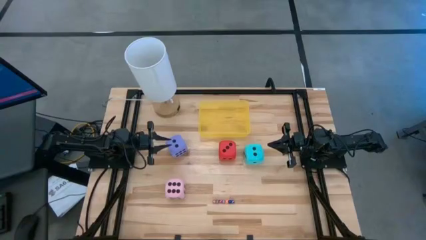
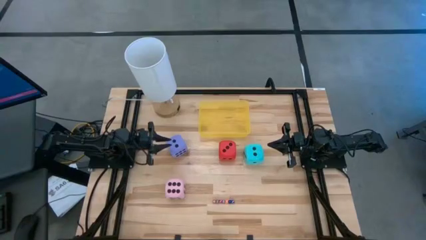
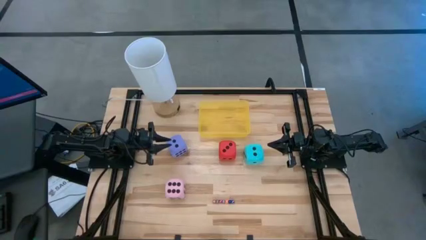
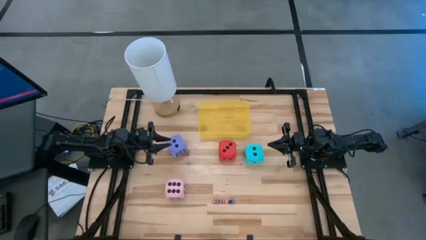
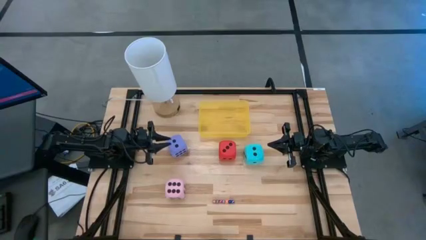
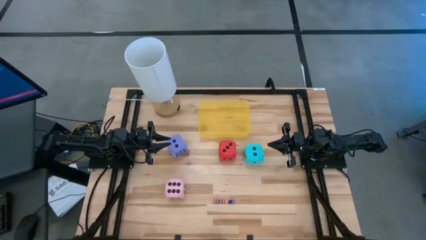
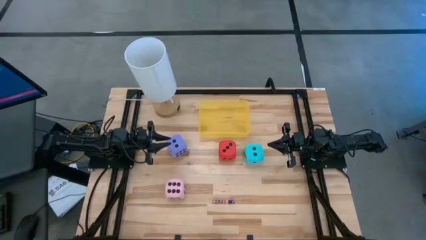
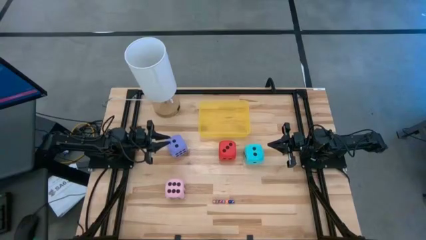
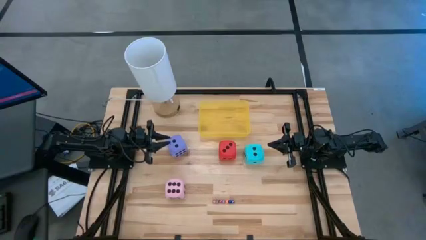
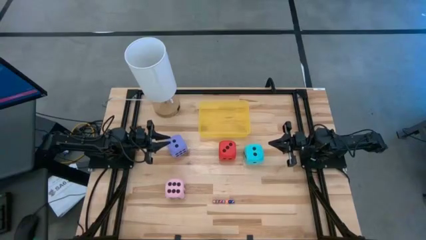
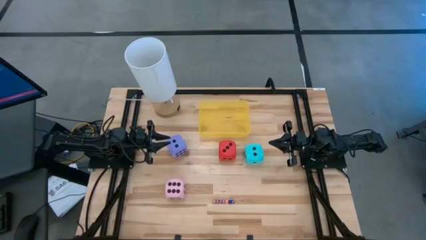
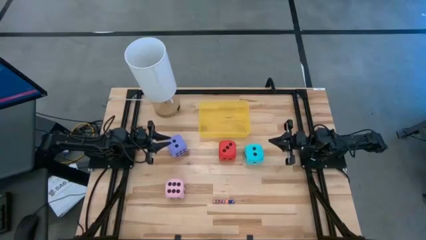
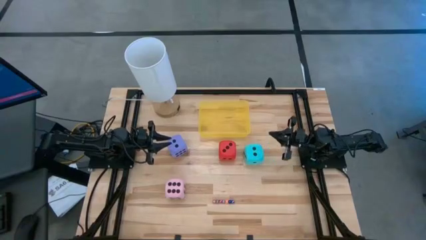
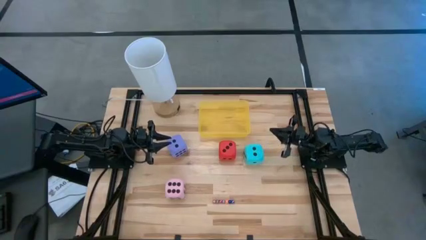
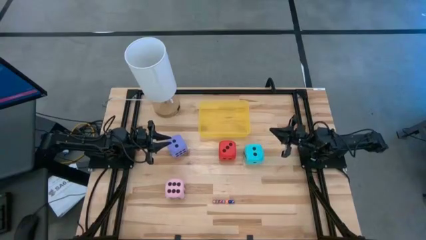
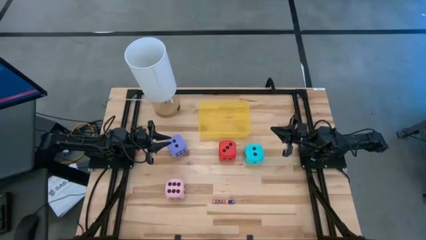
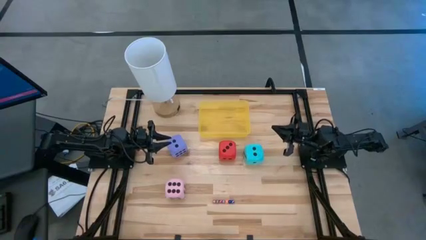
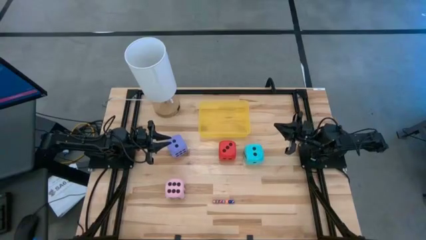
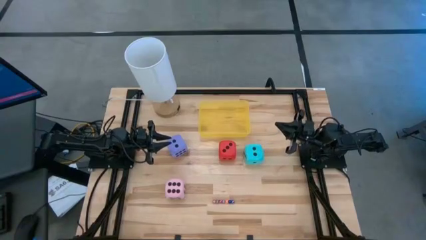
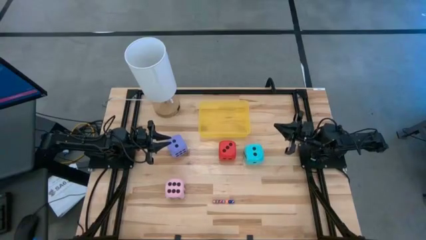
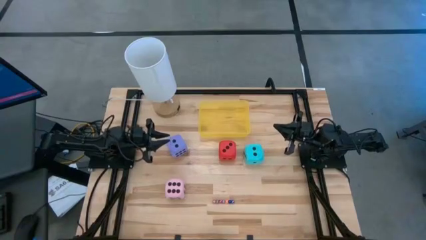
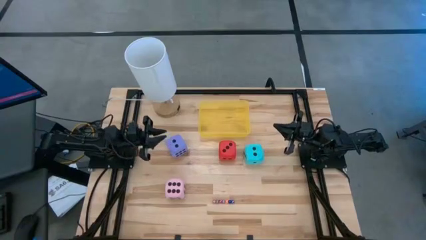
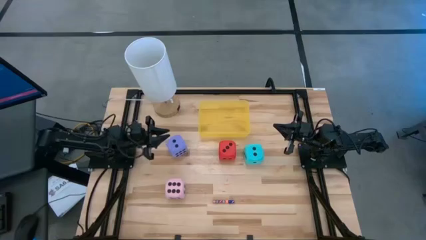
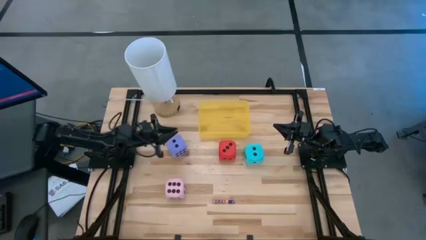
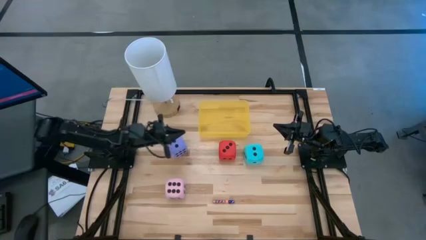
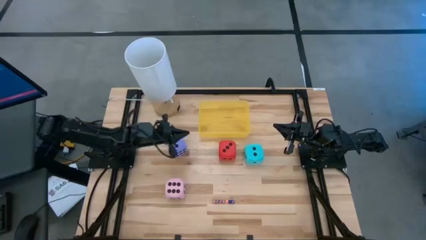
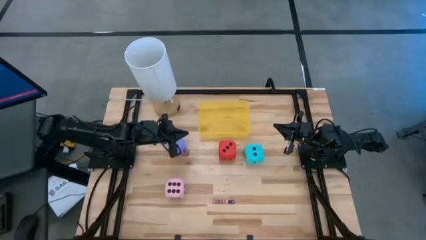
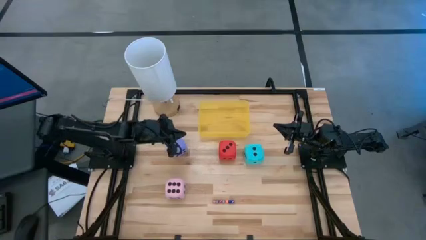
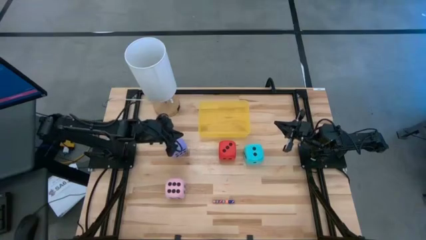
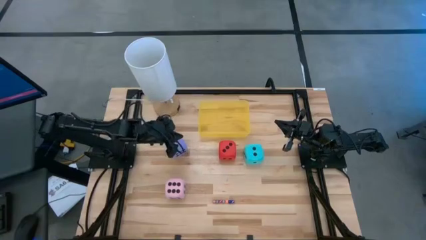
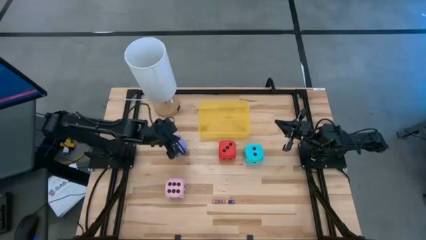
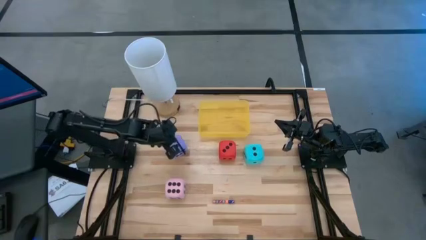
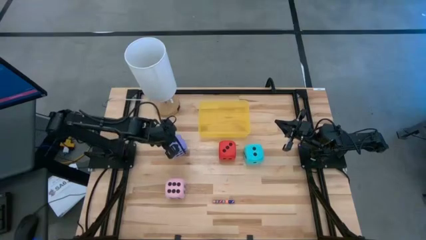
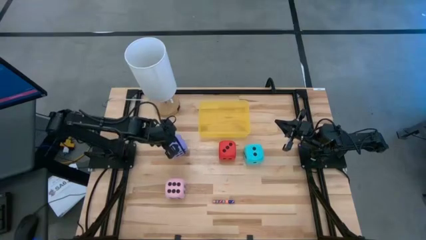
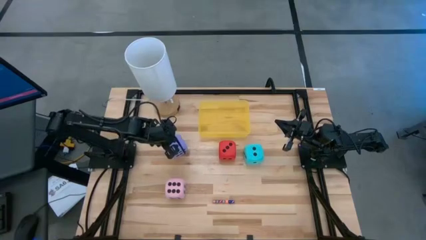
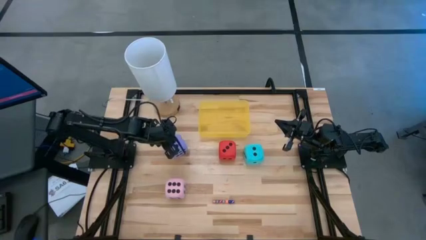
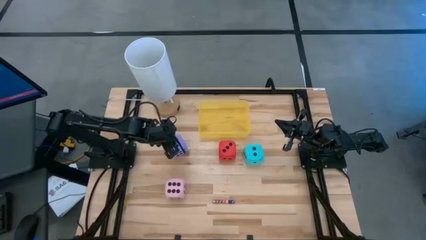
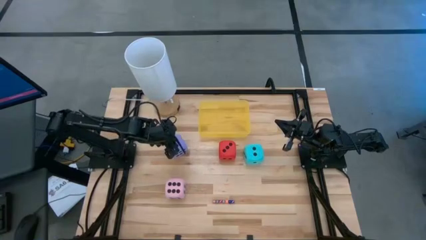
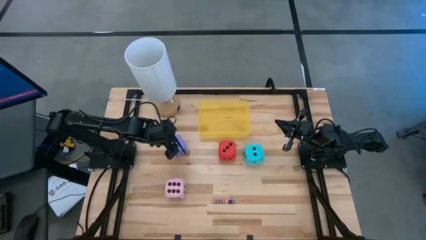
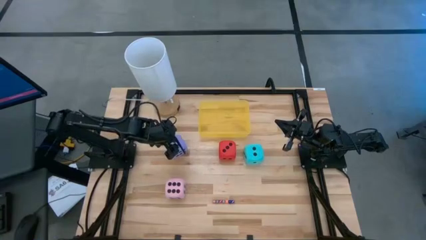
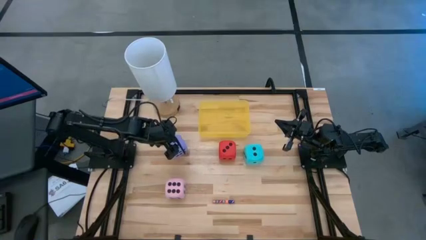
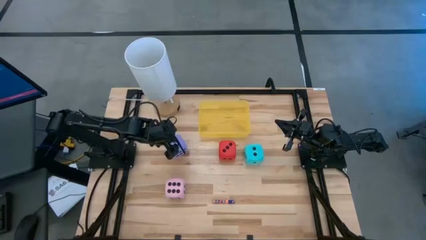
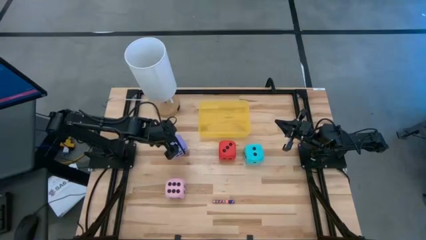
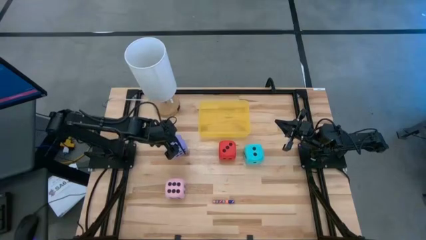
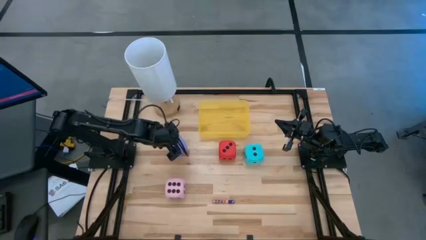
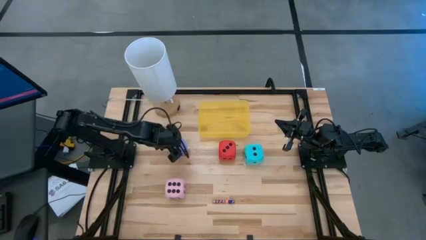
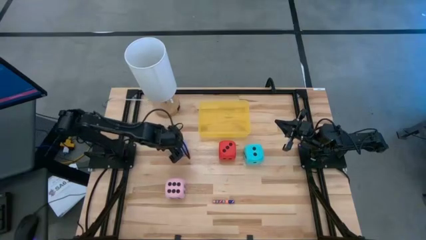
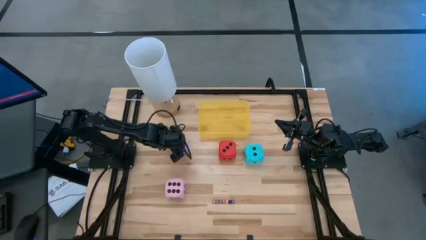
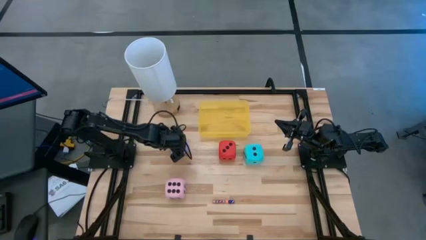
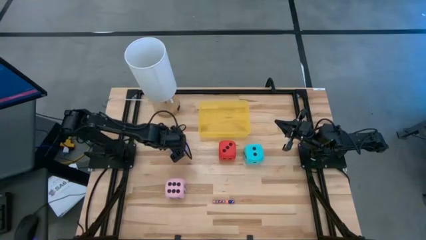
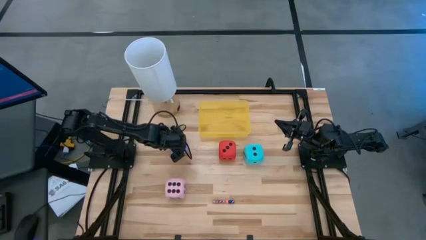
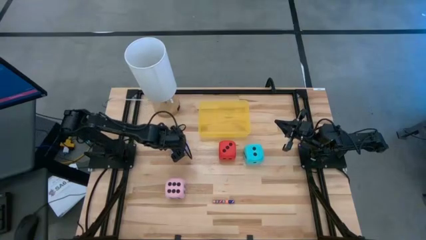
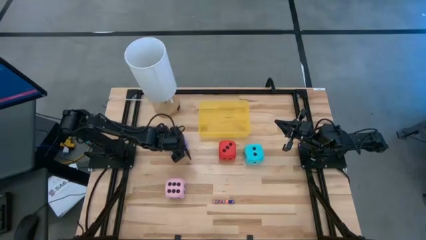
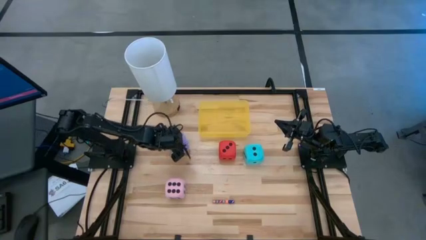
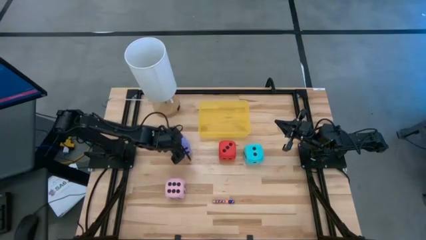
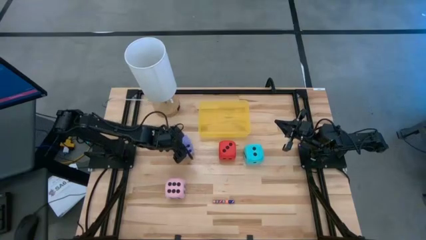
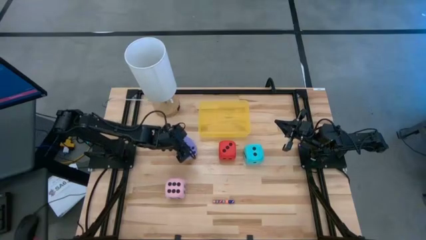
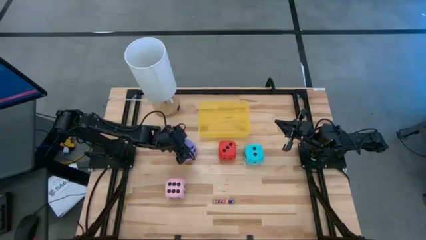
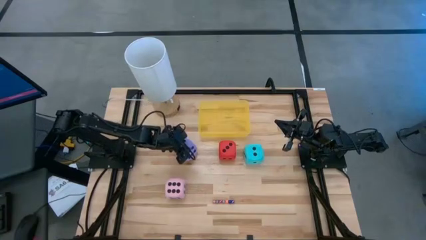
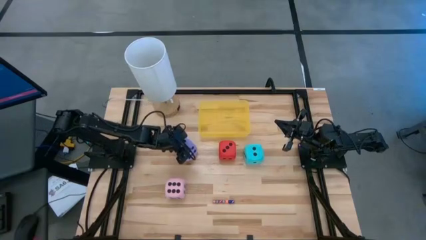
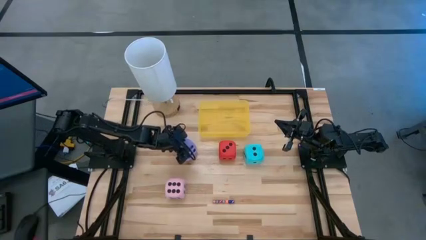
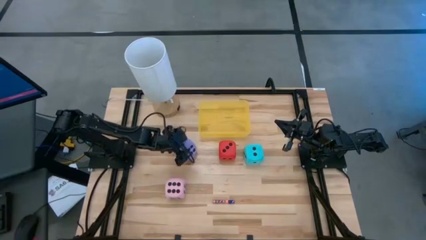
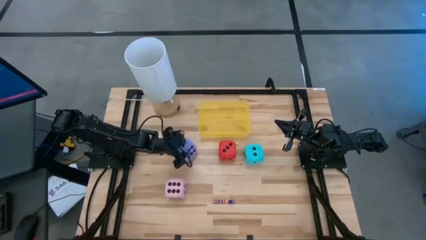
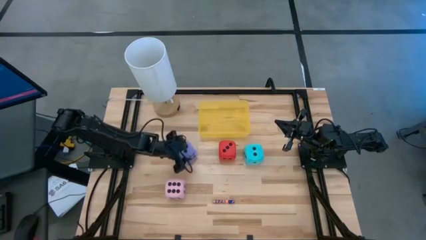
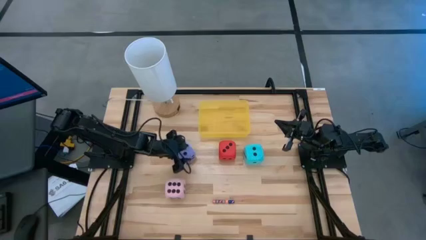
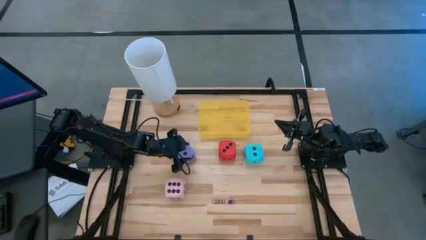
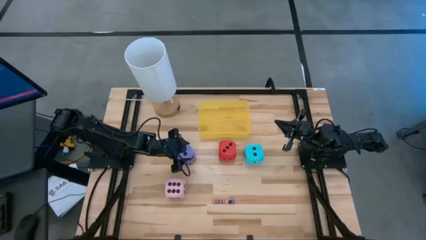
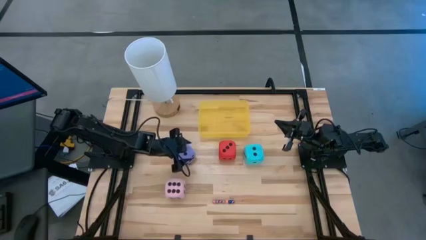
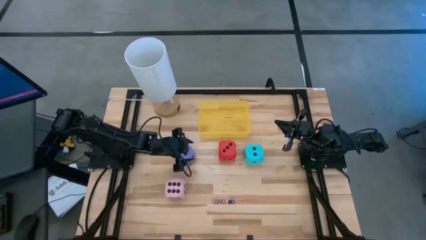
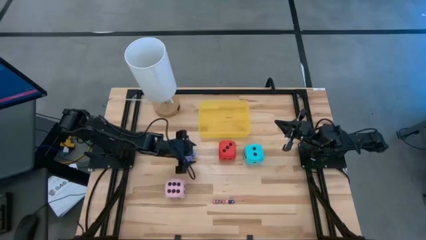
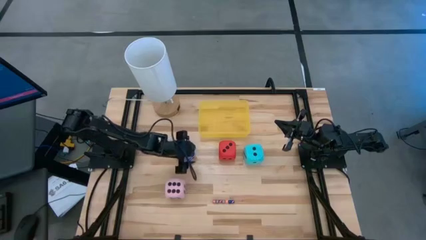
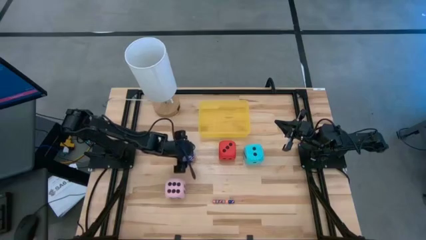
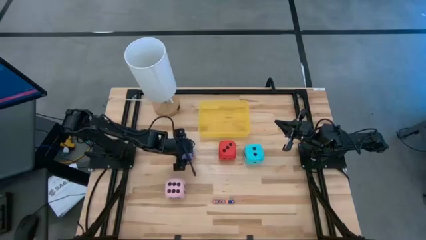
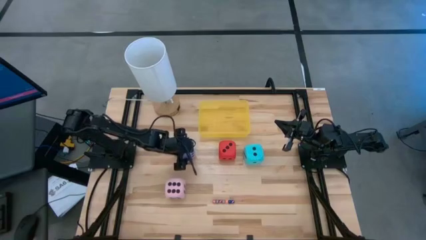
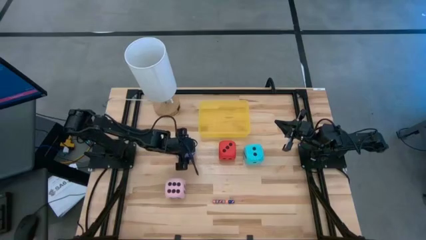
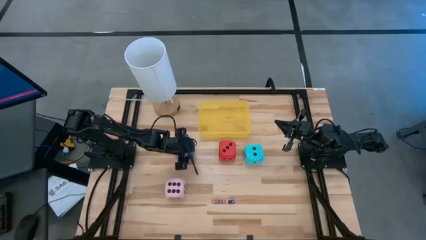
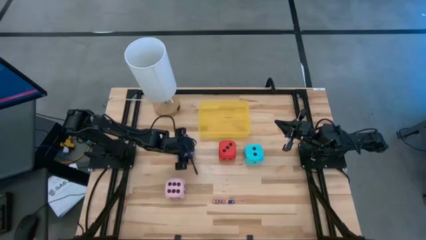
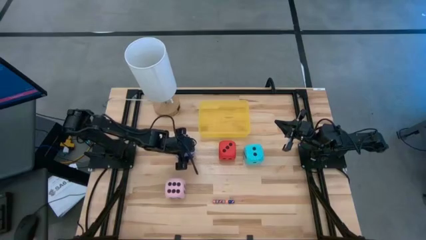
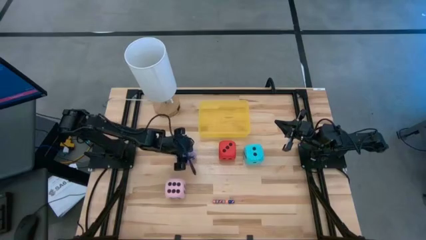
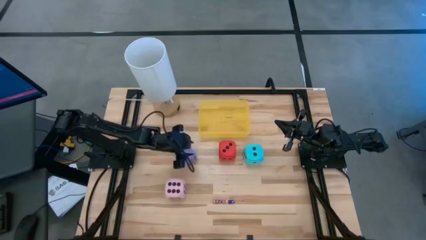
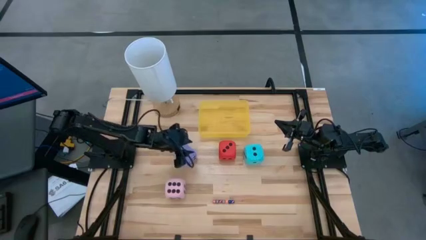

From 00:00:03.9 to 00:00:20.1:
Task: Pick & Place Dice
Put the big purple dice into the yellow bin
